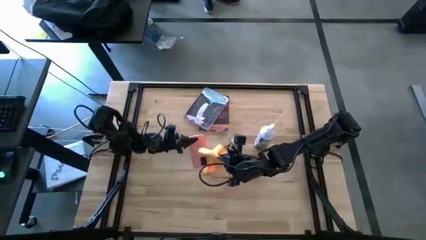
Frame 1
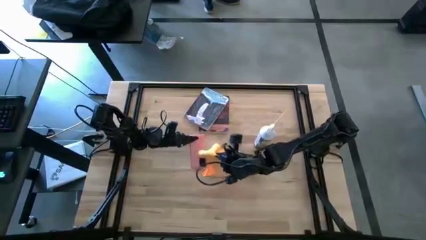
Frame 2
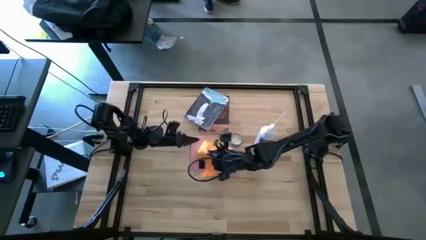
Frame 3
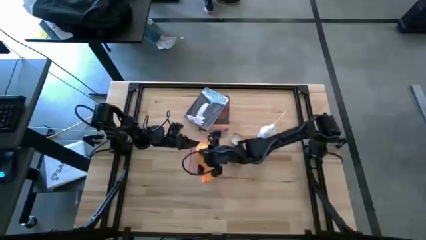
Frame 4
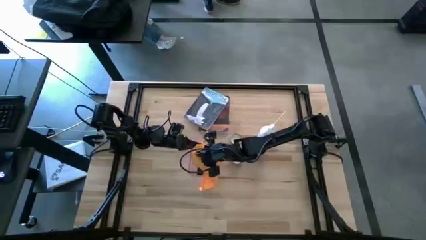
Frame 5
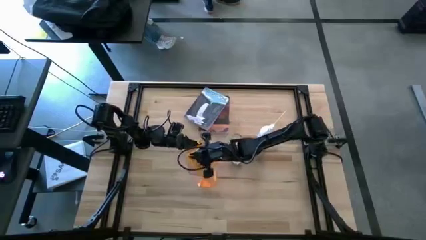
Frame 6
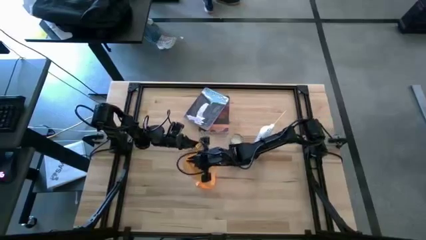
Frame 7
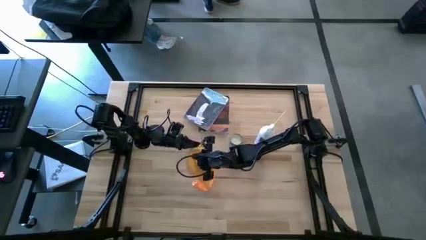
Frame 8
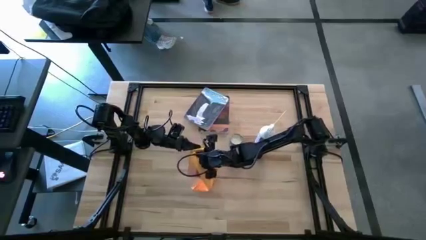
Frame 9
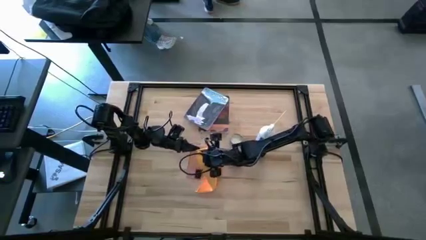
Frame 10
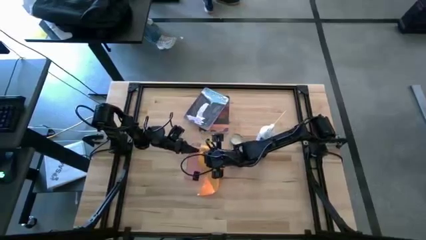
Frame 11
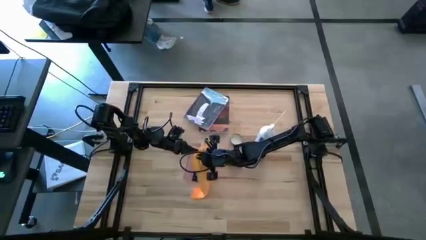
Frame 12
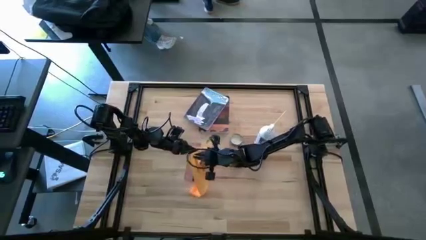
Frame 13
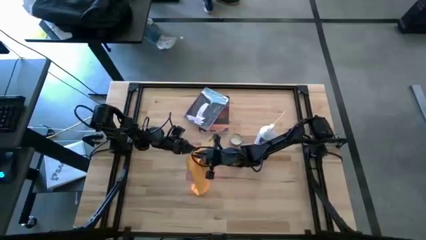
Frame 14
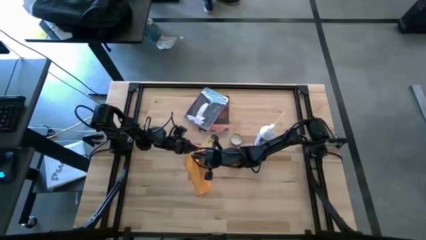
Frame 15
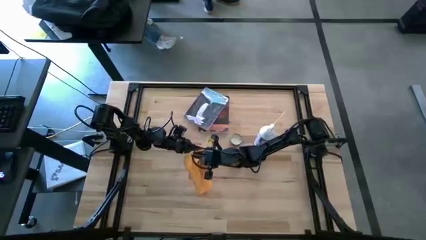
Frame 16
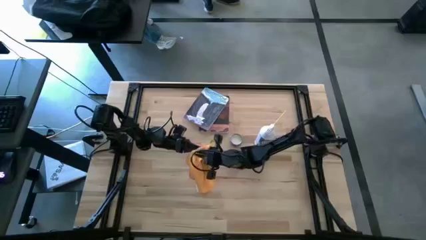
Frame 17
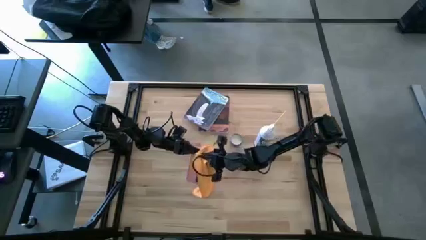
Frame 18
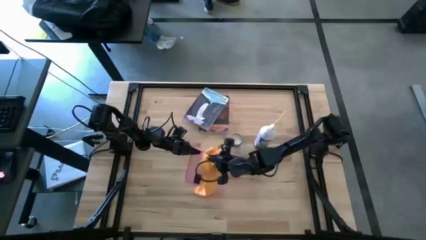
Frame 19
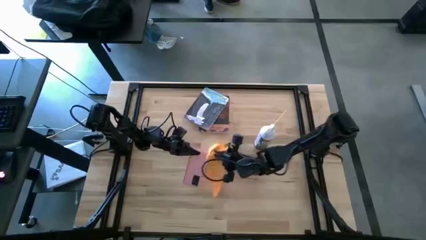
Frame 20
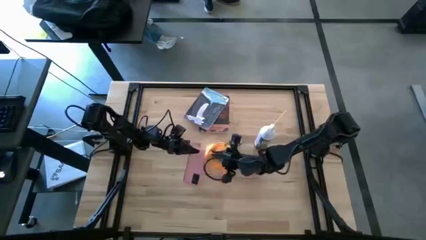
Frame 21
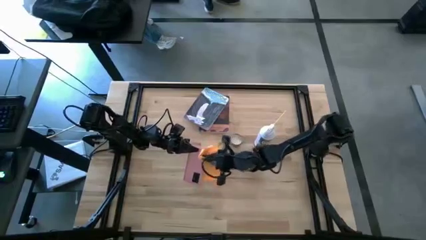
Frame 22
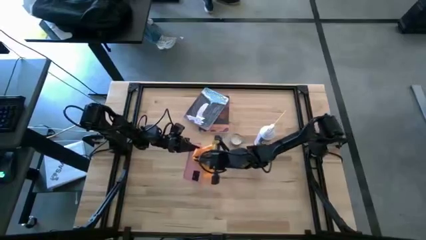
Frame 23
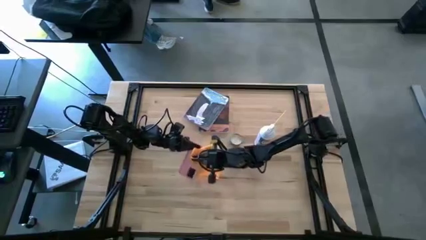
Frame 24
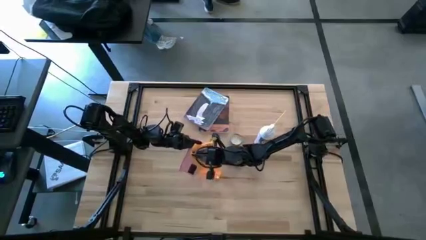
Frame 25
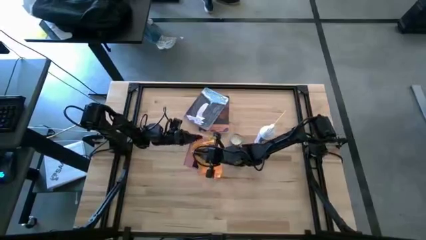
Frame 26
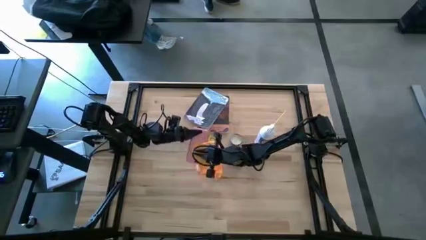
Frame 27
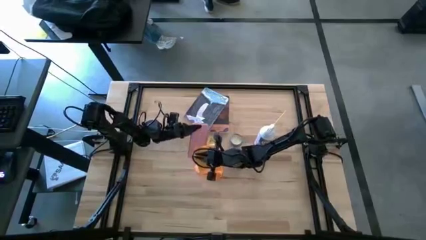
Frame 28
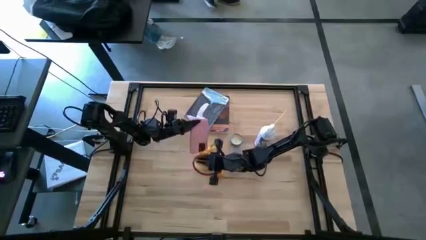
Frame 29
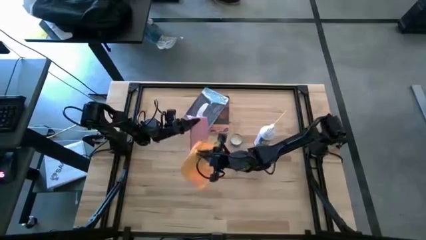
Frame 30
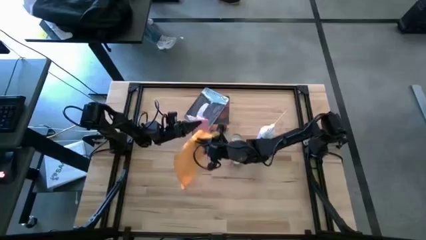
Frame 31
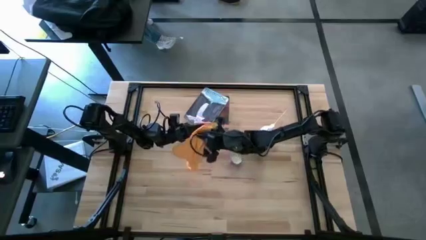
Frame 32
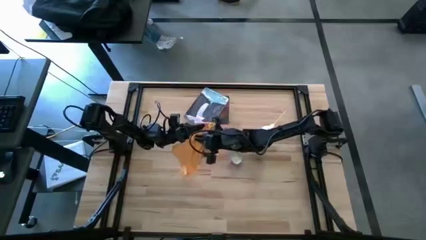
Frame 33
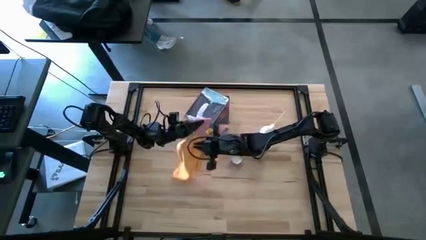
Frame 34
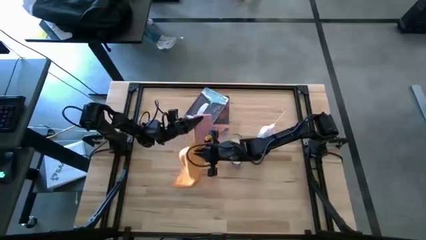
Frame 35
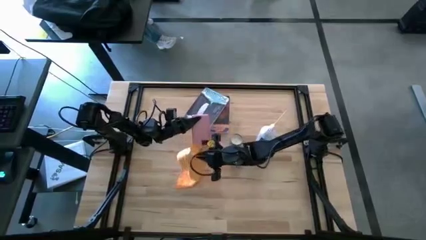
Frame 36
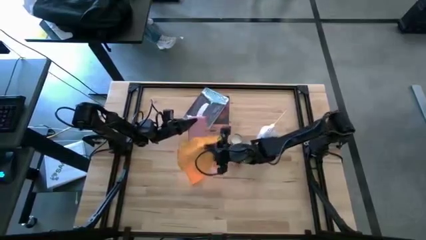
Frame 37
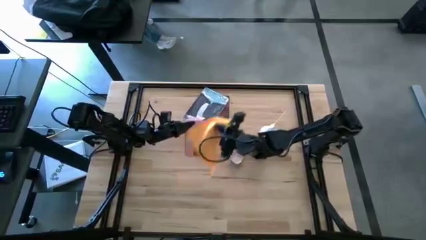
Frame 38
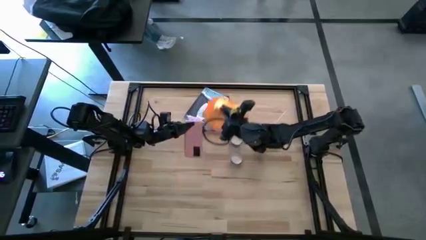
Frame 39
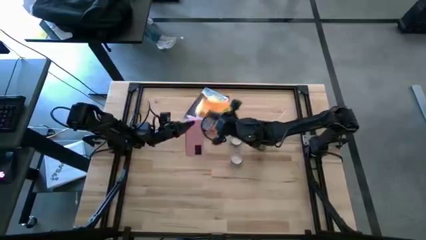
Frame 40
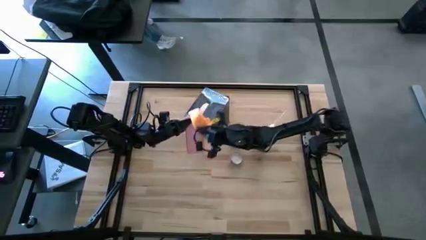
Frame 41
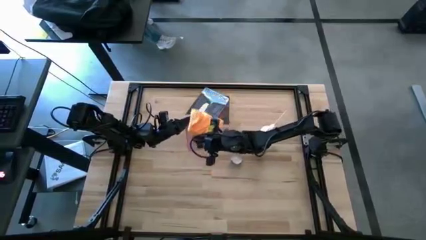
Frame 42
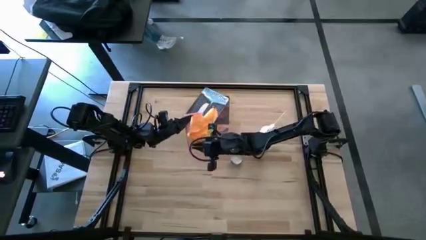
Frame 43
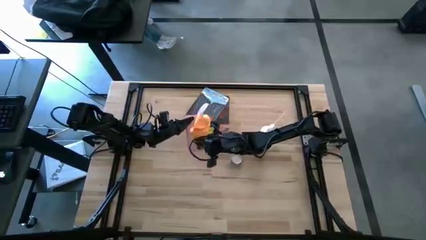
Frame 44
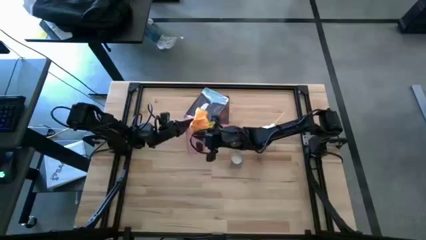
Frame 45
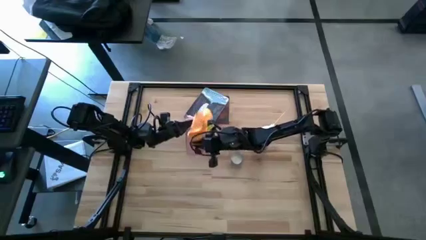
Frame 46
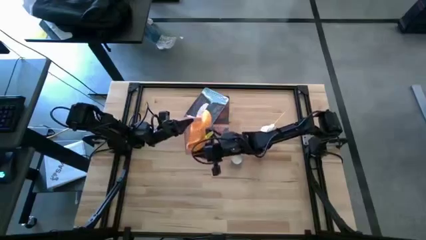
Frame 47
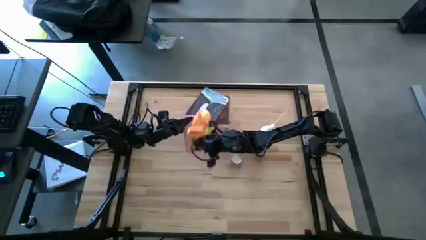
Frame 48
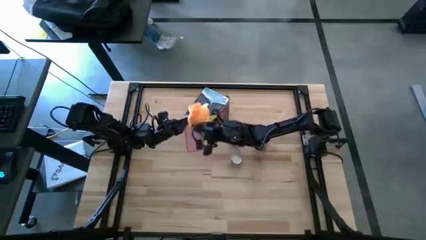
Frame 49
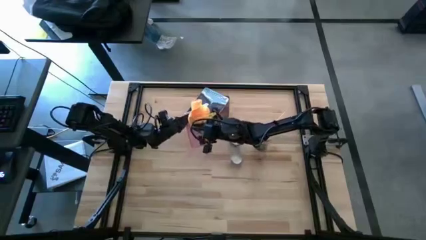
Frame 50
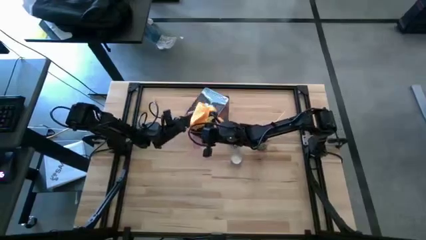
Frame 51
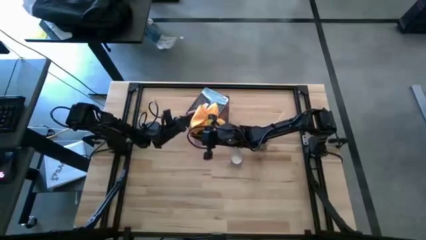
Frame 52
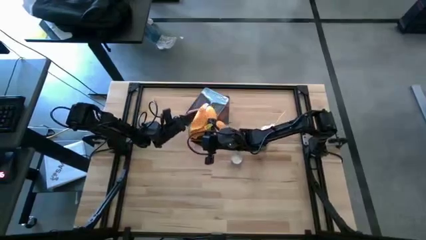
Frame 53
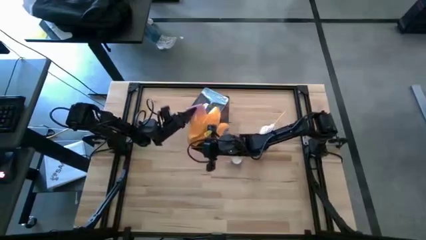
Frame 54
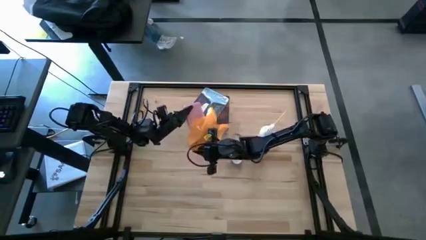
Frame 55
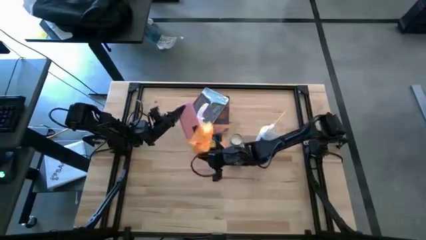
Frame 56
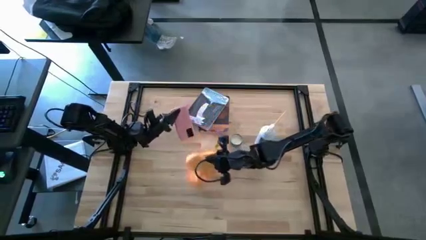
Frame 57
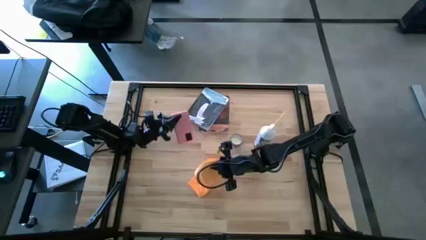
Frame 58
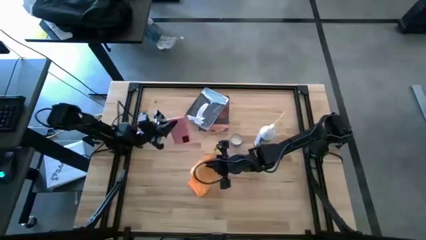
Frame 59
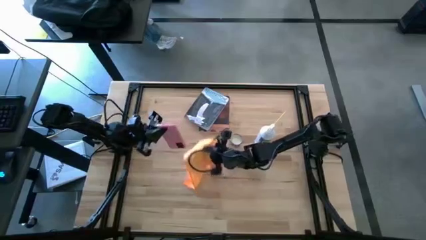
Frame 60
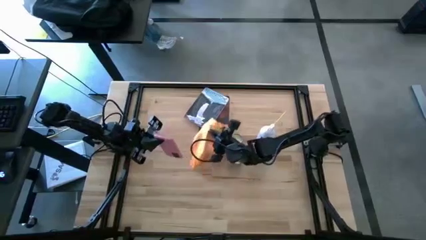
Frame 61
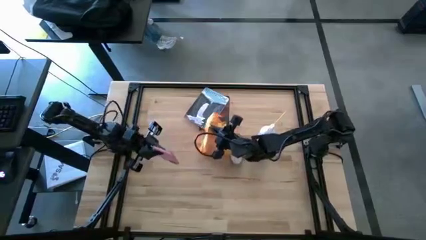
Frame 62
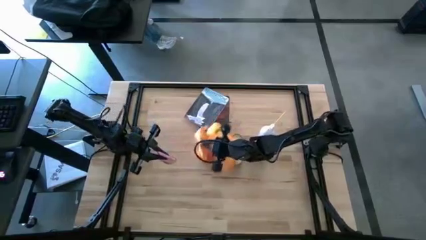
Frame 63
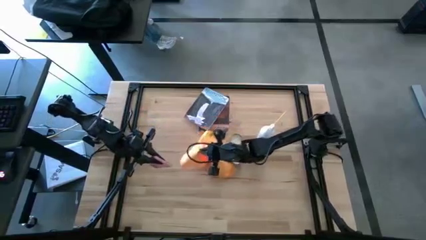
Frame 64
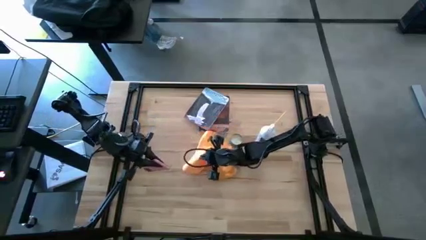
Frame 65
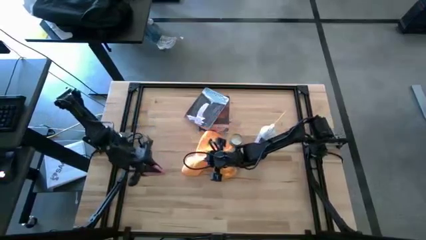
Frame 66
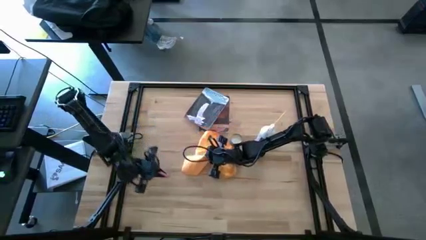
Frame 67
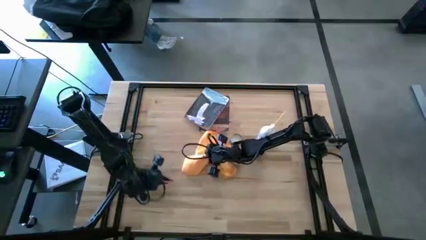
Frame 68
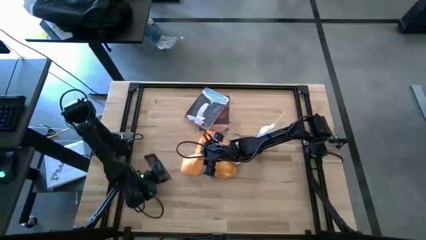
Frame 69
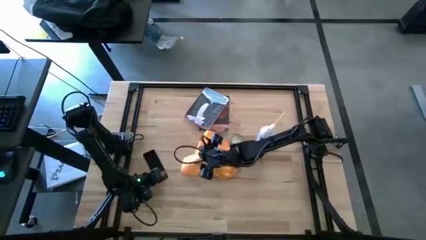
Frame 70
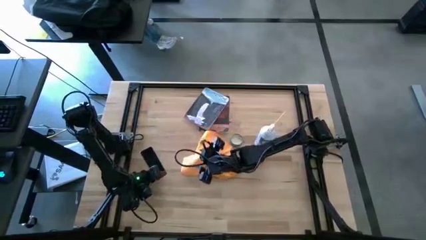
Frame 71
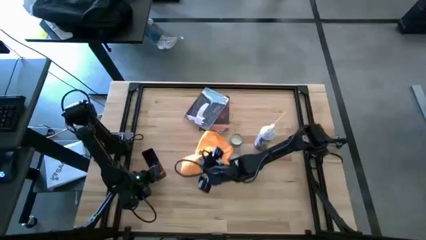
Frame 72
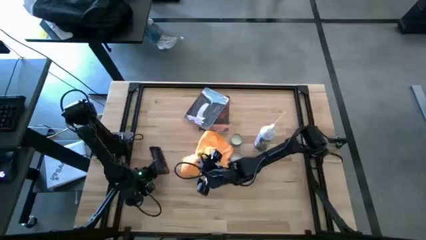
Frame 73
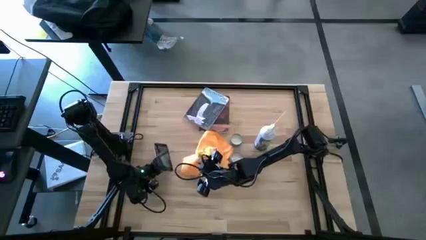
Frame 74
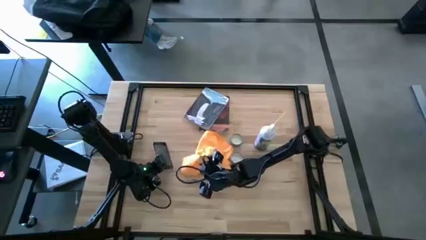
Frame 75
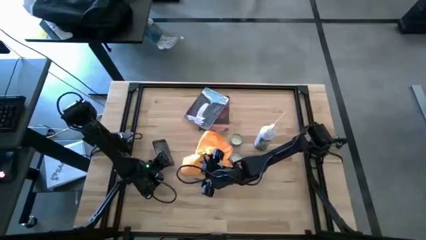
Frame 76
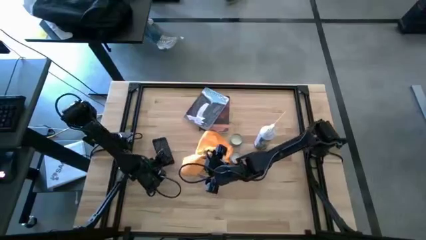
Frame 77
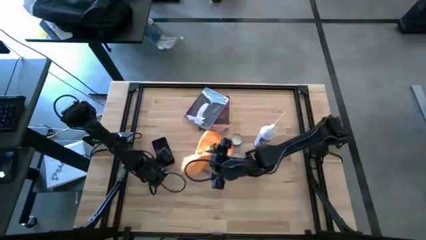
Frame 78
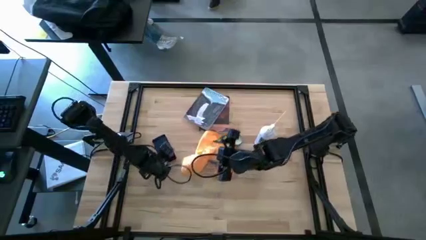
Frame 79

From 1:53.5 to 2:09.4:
Task: Apply microfiber cloth
Wipe the pink phone with the orange microfiber cloth
